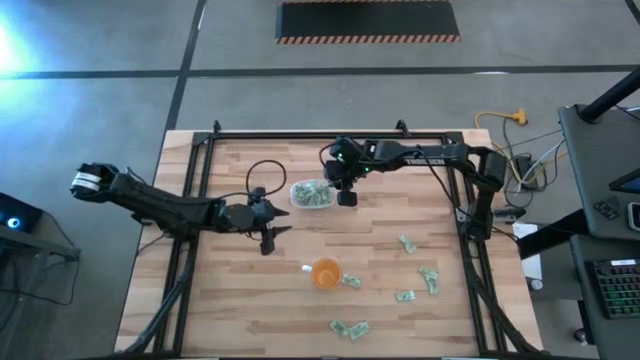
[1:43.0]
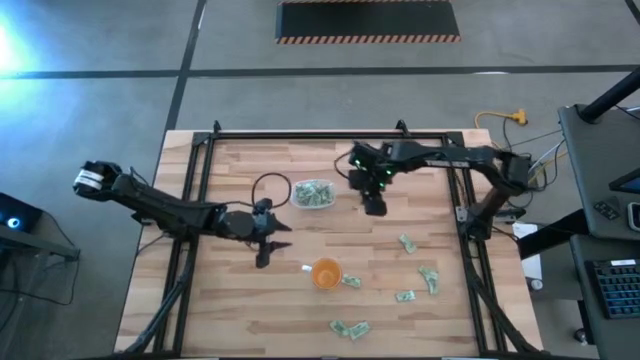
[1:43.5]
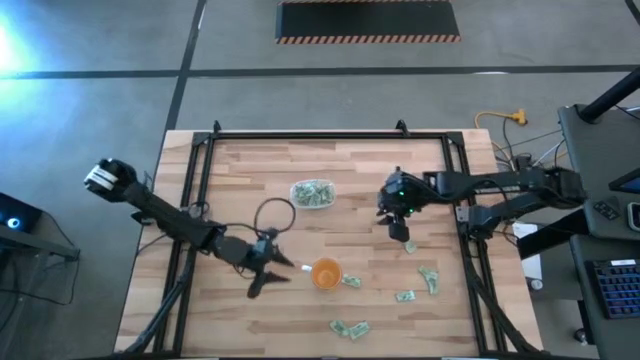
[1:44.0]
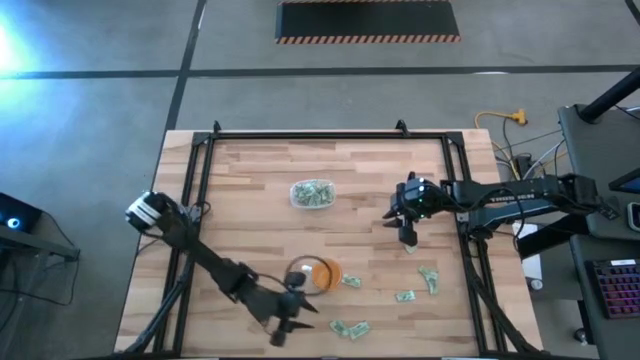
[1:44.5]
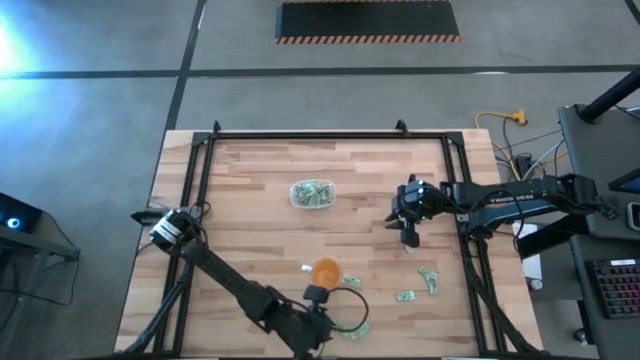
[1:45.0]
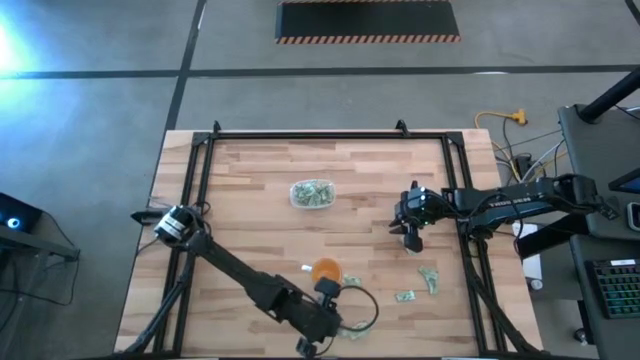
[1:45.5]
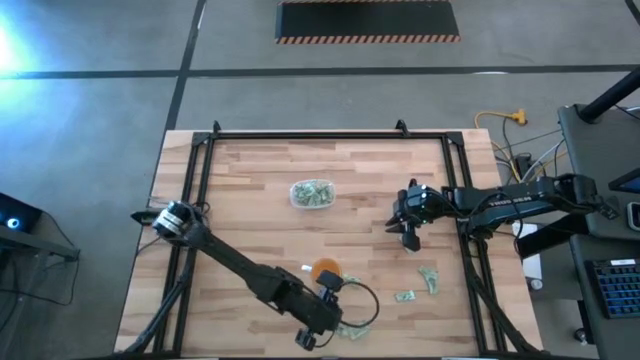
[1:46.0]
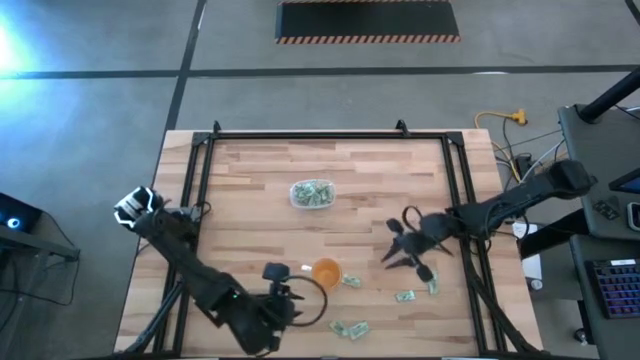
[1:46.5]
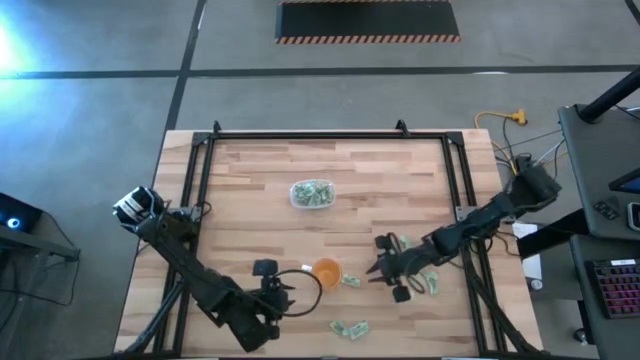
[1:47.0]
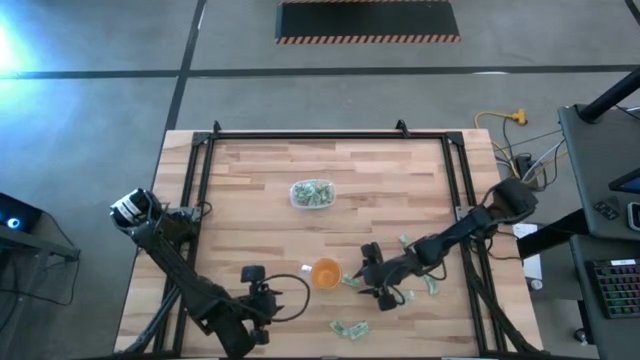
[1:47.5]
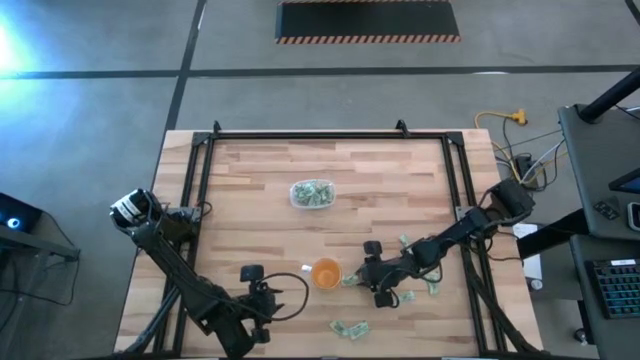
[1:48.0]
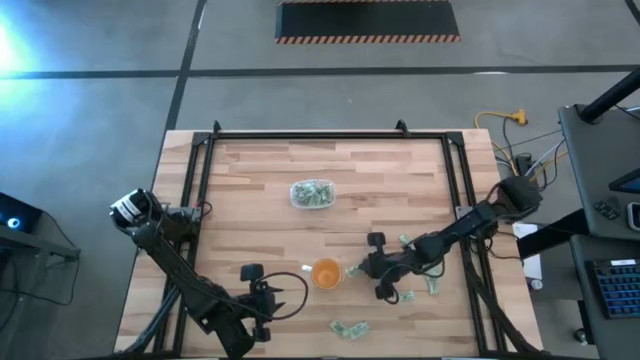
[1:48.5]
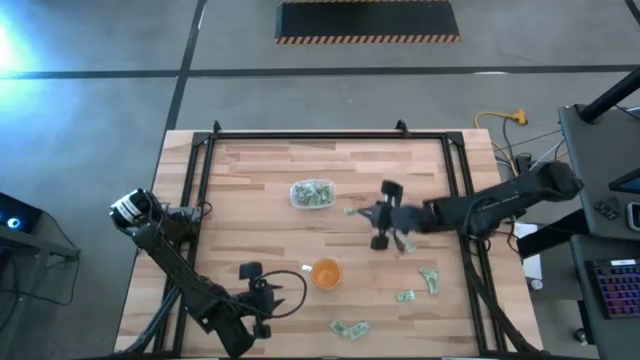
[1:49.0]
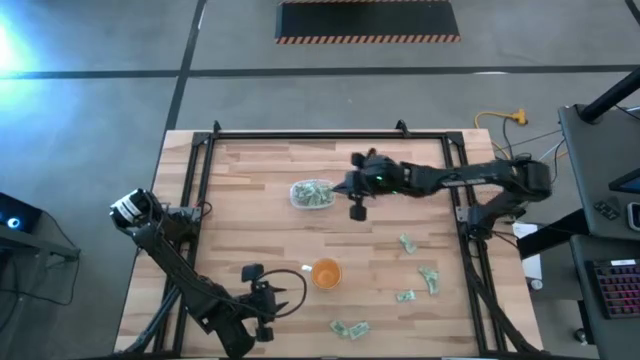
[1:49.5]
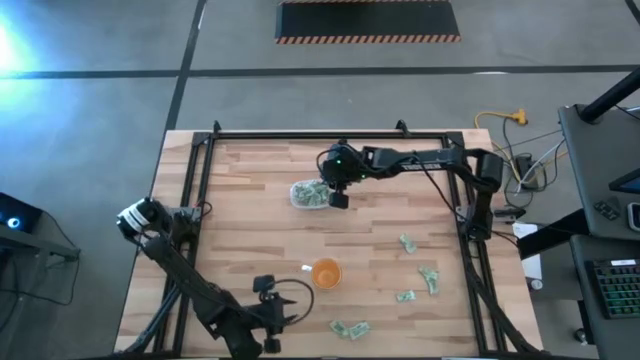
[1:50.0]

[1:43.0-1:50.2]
Task: Pick and place Stevia / Truvia into bins
Put the stevia packet into the transparent bin

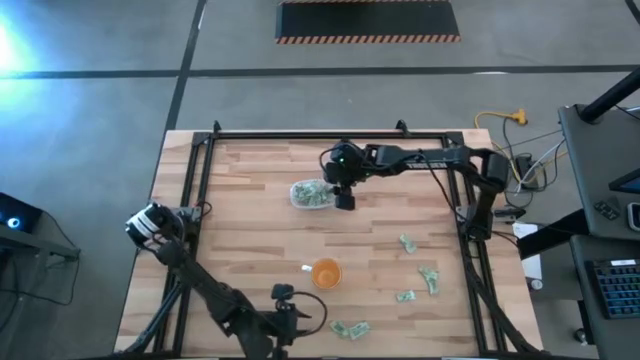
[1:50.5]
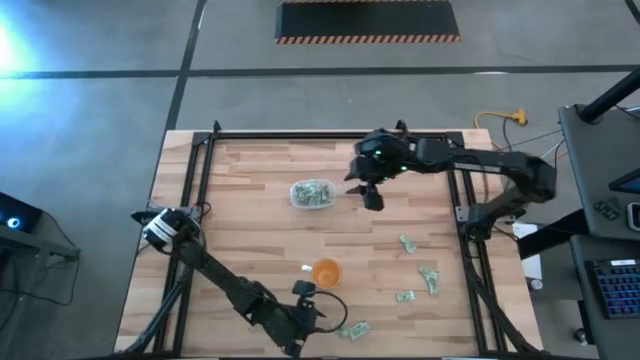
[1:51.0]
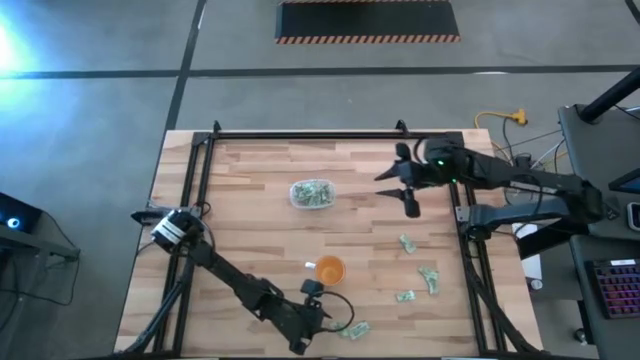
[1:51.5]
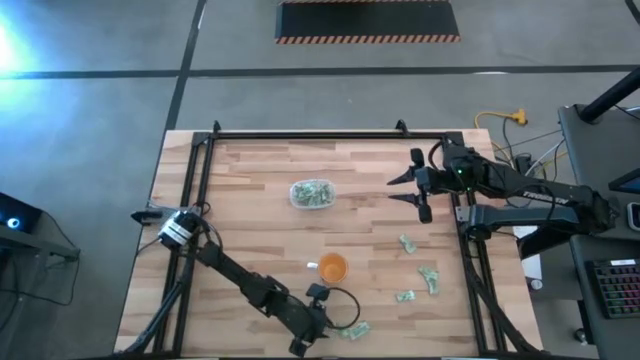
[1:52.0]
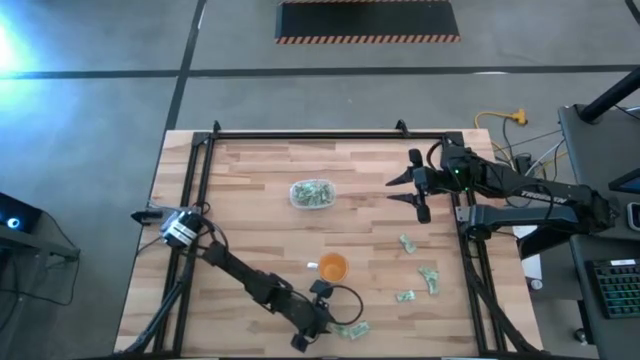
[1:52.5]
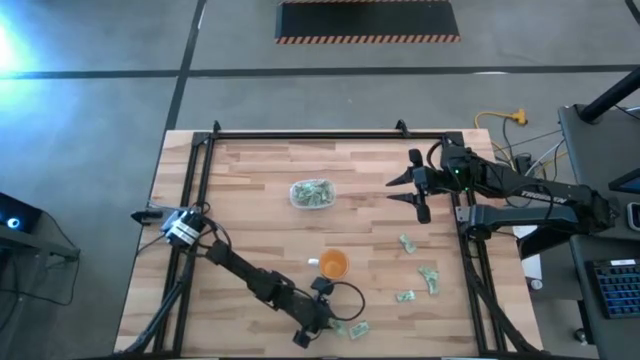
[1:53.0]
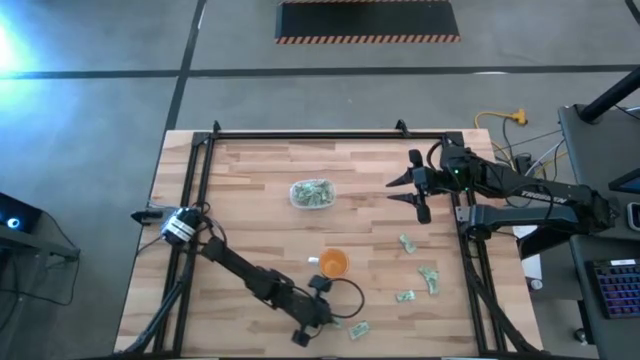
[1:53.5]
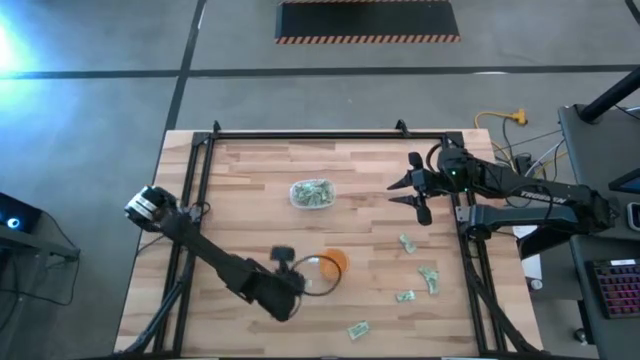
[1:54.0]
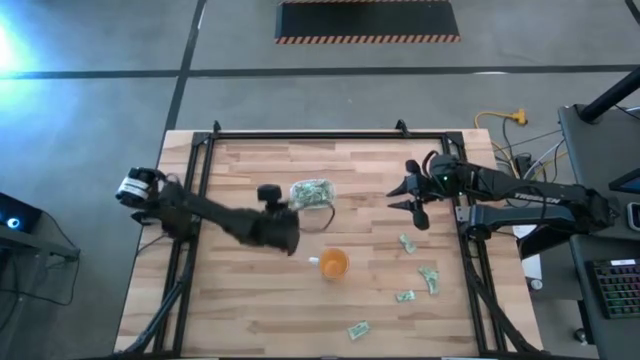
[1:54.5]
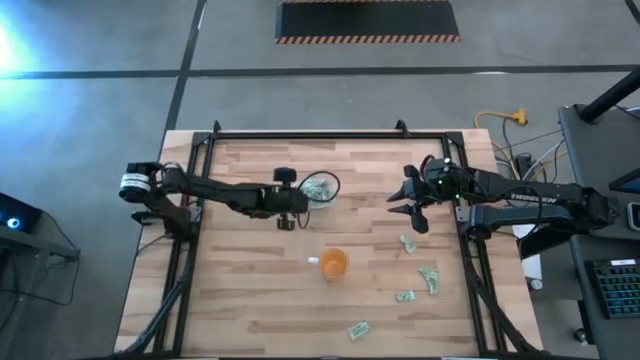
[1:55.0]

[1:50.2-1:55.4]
Put the stevia packet into the transparent bin

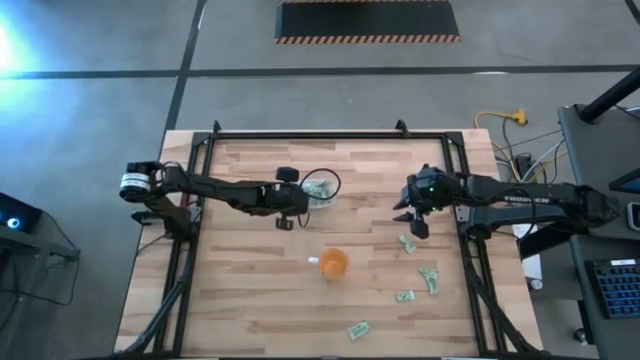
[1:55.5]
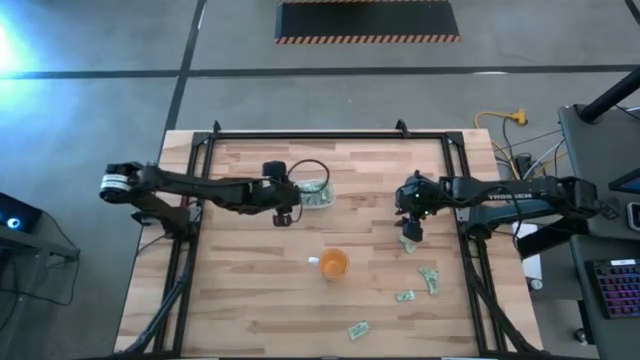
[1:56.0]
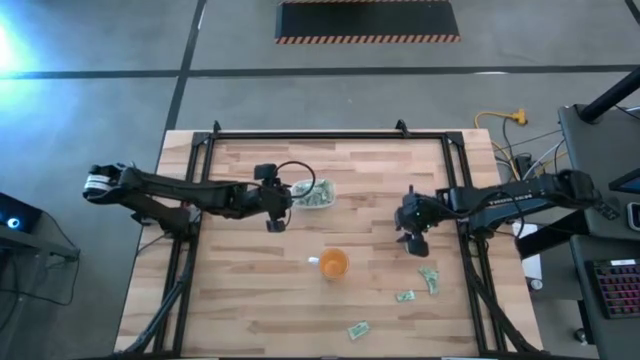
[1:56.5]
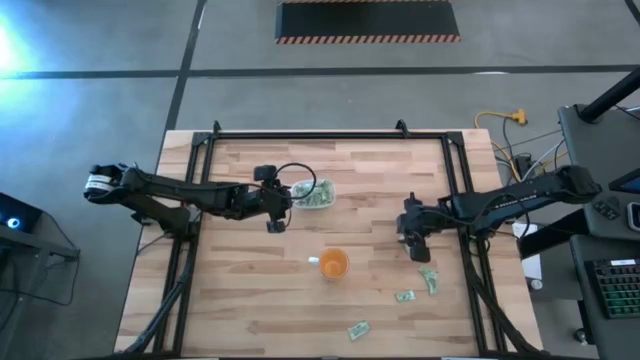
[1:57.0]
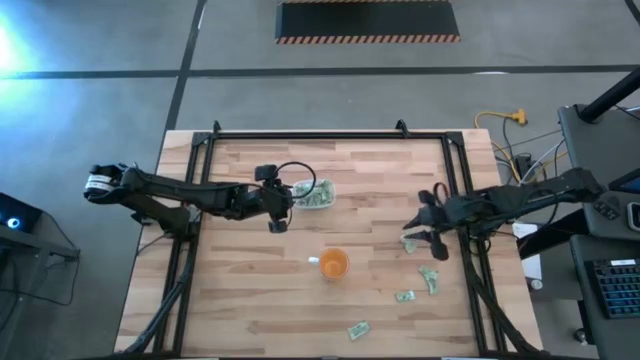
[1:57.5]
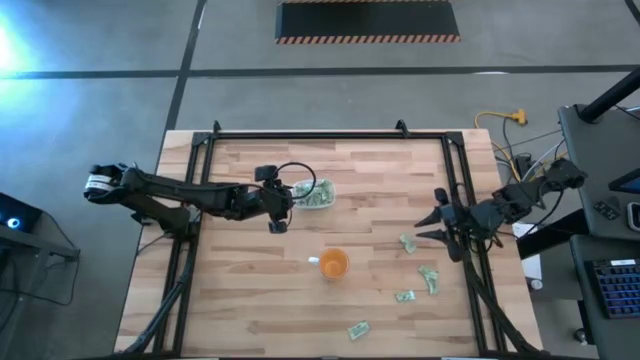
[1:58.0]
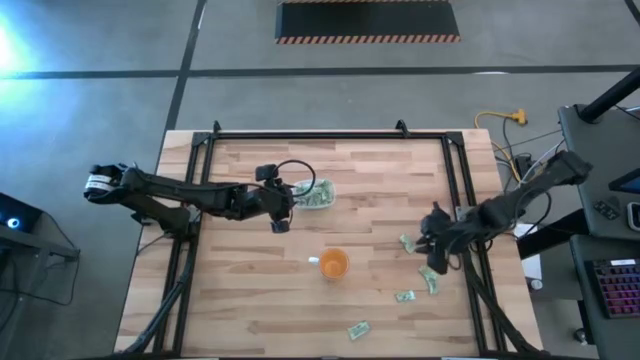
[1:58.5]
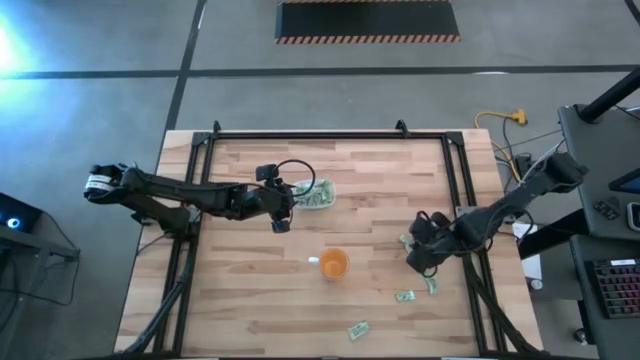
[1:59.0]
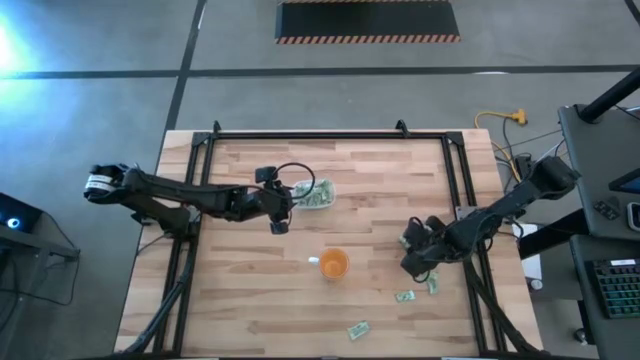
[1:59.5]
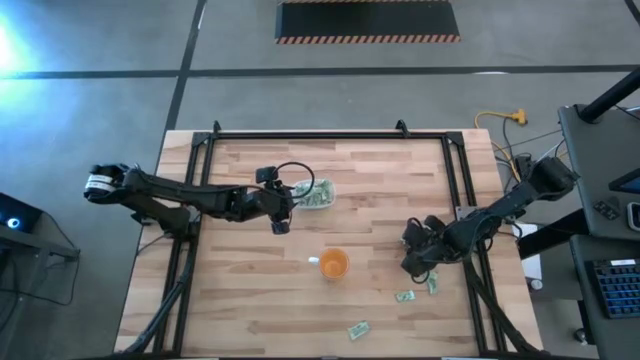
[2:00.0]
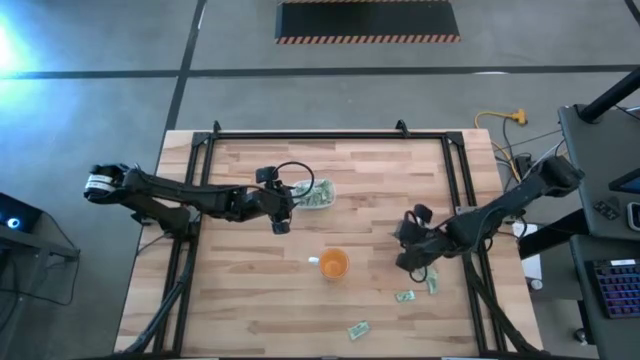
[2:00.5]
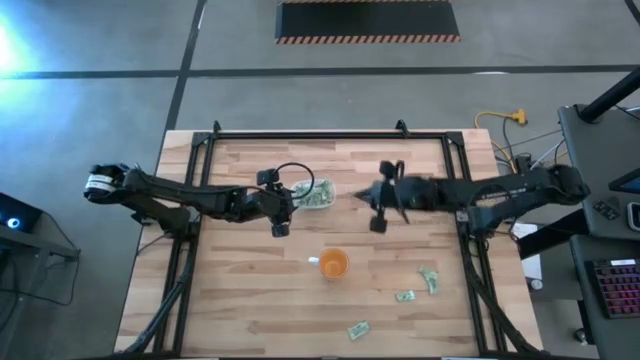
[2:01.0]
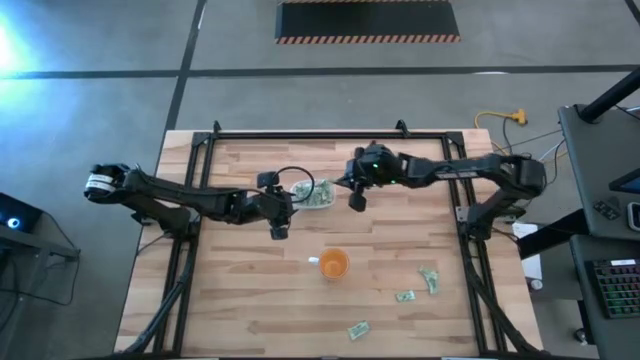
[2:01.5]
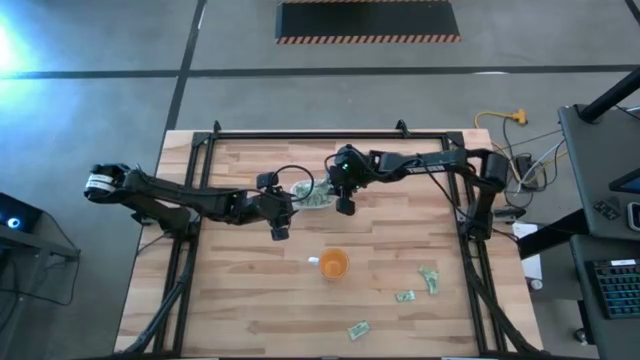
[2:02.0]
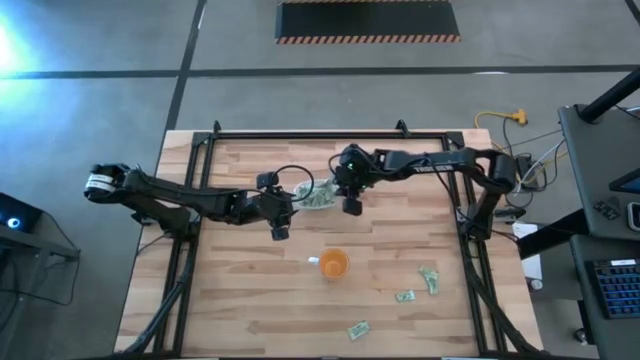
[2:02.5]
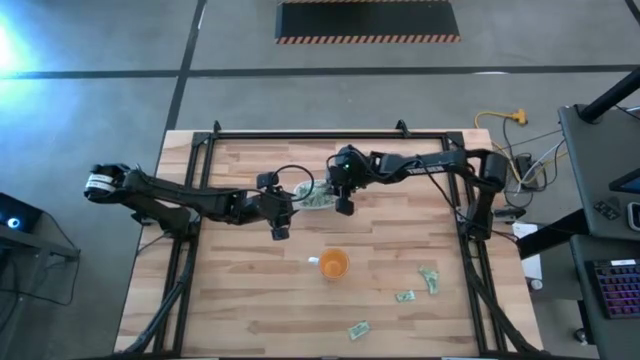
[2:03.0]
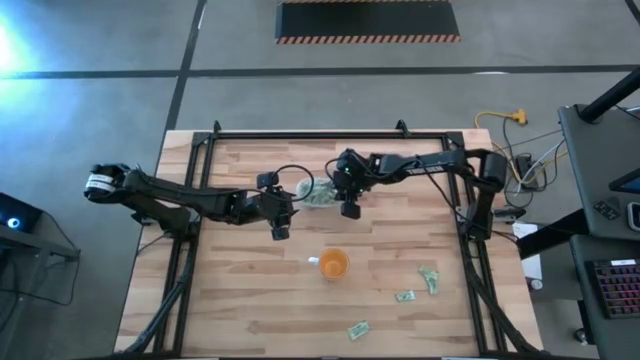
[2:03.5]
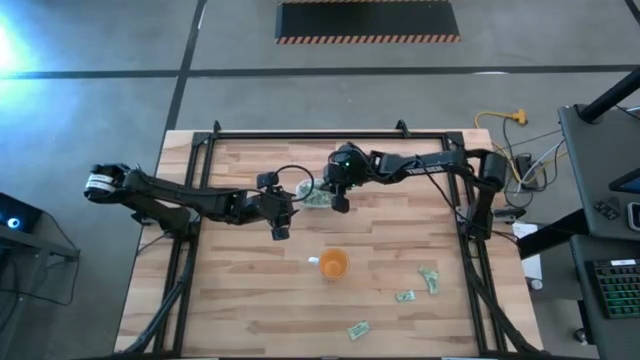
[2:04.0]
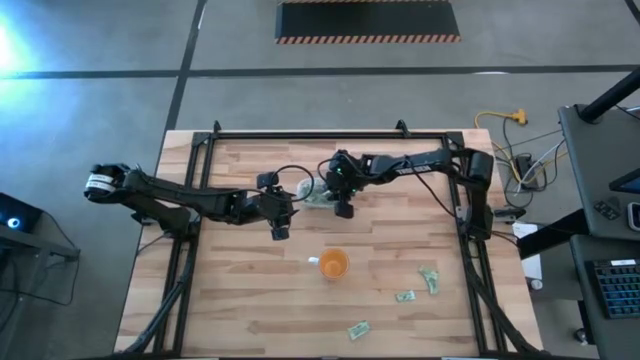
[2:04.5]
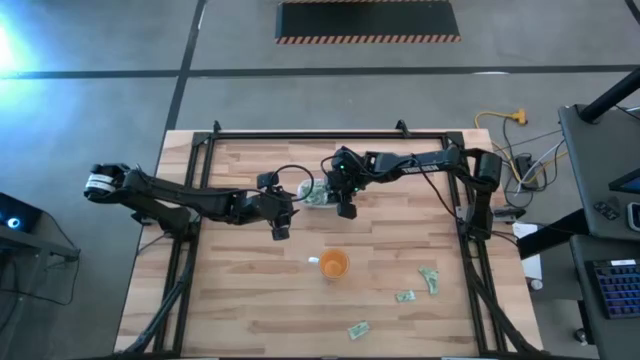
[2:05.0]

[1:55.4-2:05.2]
Put the stevia packet into the transparent bin
